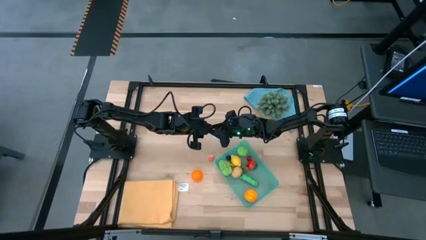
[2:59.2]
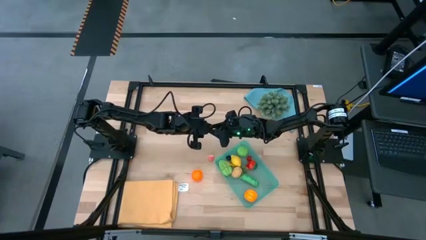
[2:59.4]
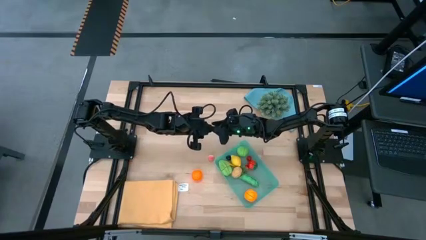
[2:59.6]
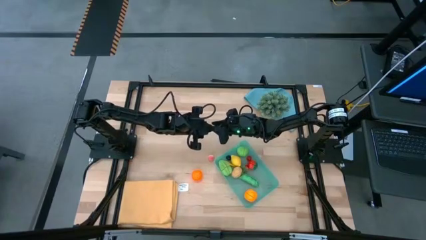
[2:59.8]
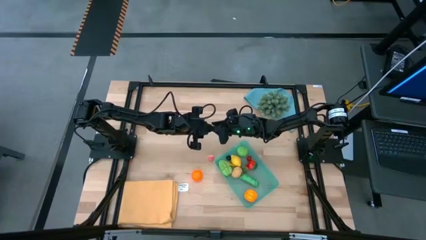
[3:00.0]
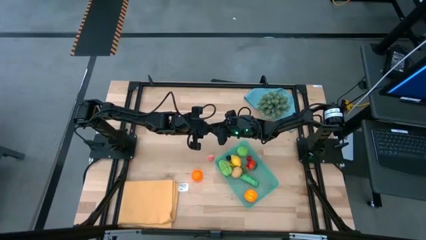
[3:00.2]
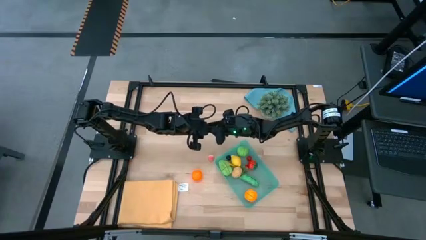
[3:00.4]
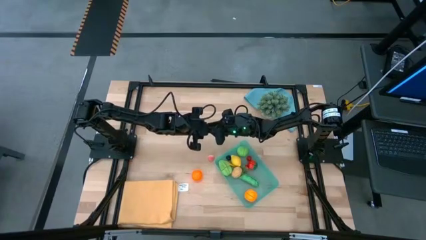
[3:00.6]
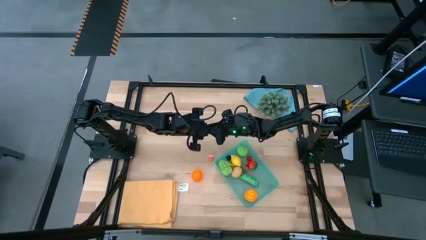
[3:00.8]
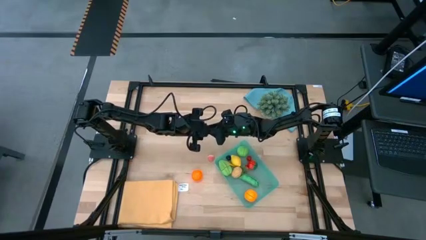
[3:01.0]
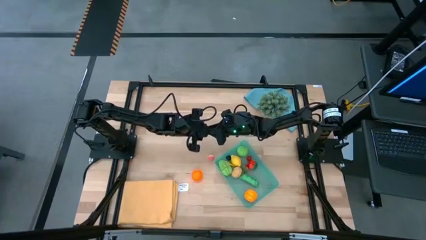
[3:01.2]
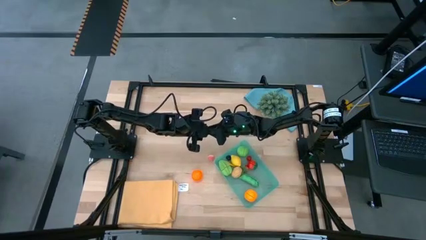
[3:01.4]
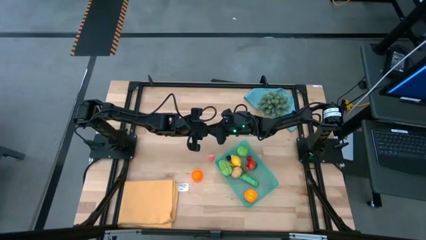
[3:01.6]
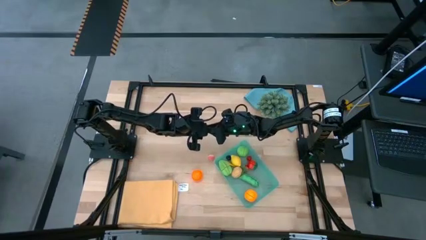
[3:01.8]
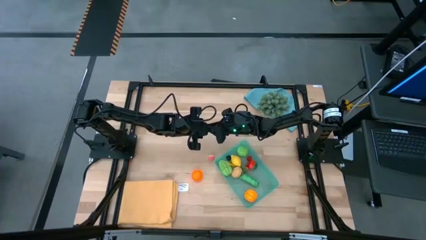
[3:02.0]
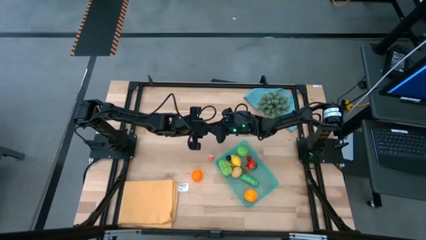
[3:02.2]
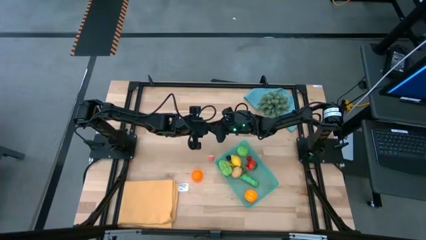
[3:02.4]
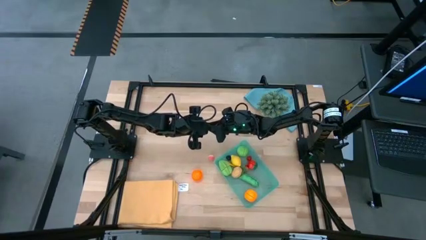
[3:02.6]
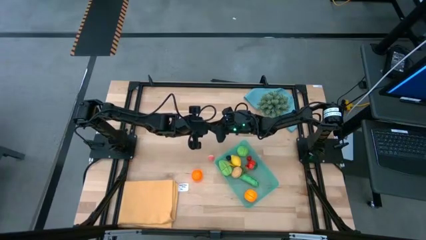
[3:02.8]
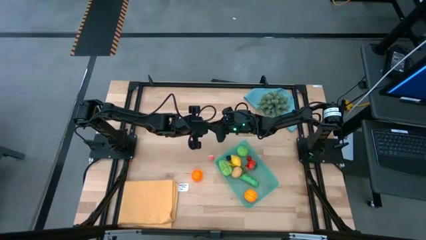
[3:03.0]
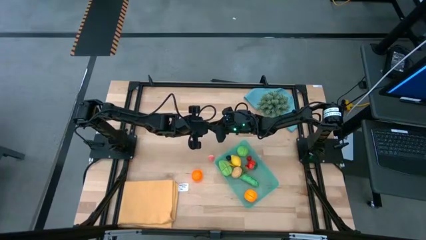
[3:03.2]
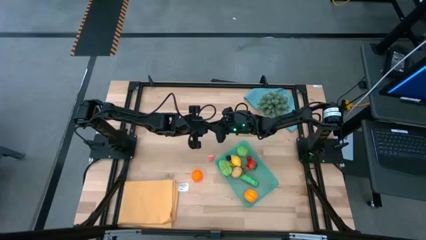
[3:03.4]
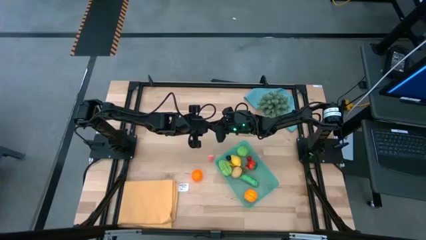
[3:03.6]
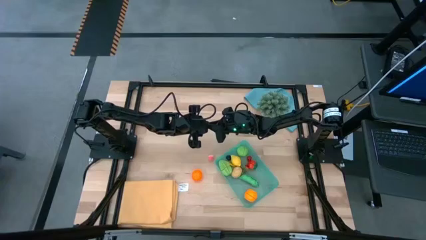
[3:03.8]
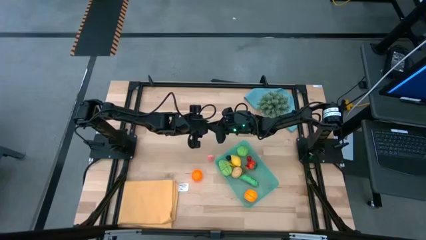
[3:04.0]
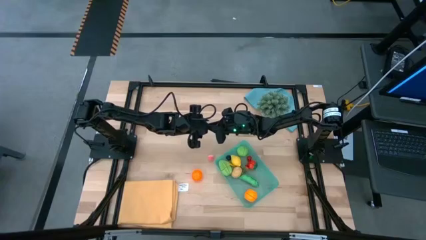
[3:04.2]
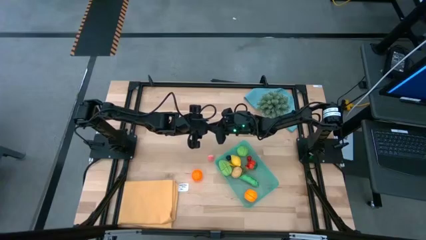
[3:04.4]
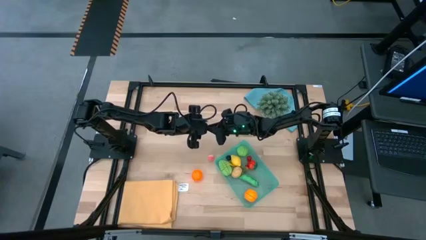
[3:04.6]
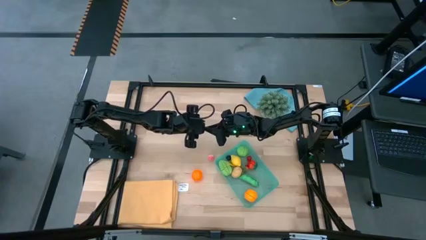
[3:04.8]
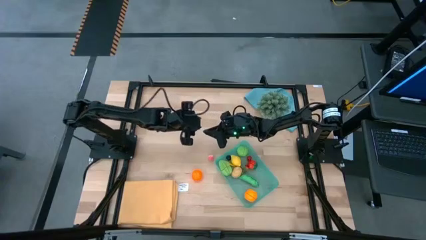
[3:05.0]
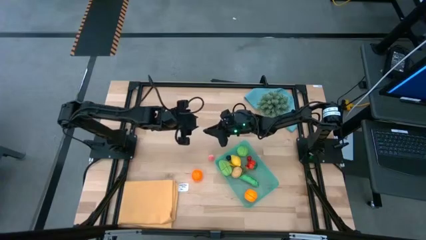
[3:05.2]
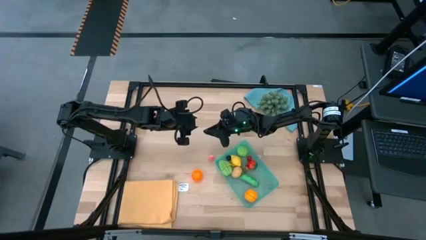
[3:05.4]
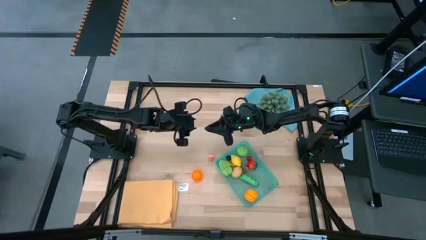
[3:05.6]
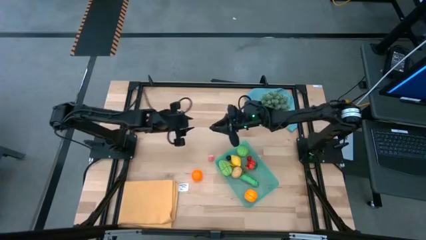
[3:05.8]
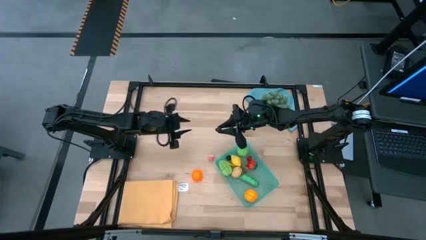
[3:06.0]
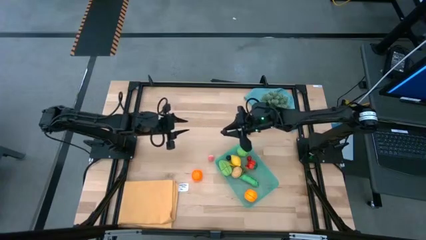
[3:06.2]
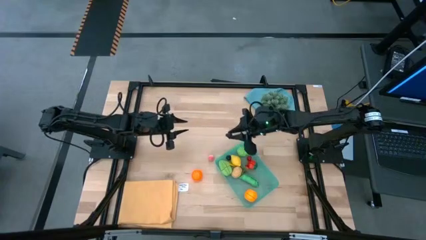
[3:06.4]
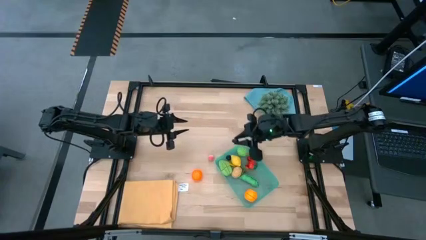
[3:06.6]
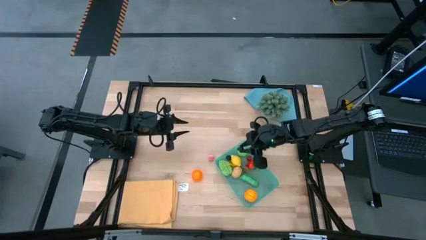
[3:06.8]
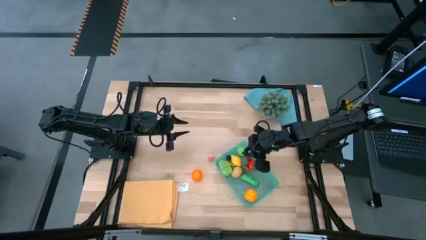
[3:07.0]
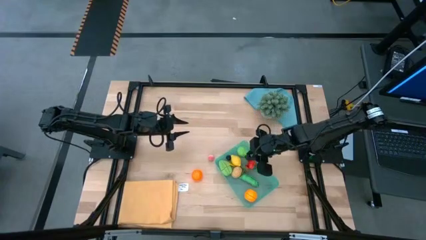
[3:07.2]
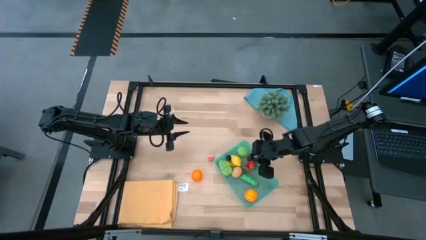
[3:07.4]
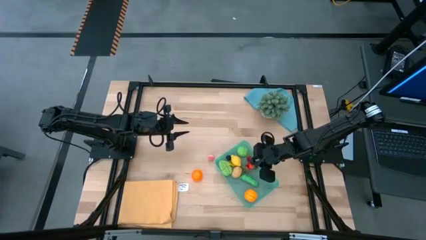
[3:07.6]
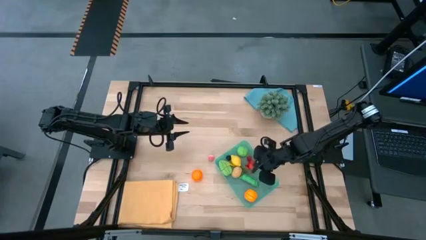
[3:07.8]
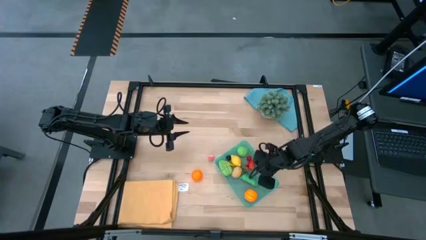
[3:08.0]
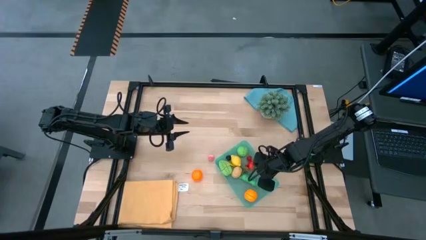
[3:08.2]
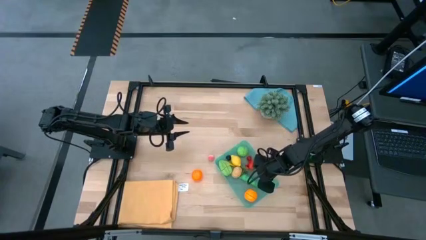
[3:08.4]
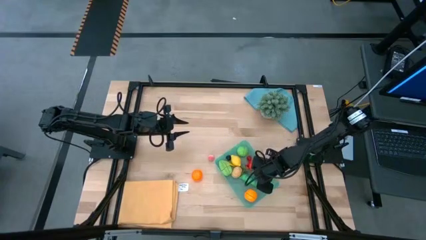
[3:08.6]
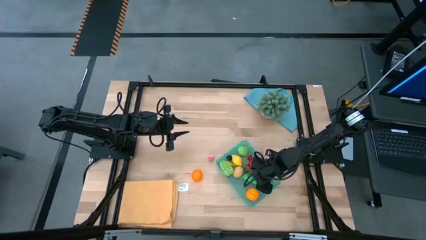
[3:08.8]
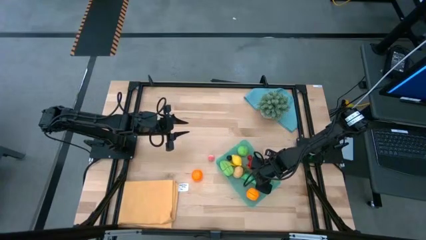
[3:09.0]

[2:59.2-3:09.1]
Task: Pick and placing Produce into tupperware
Put the blackberry into the green bin

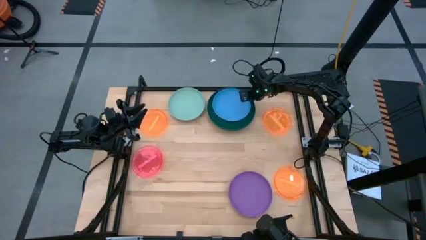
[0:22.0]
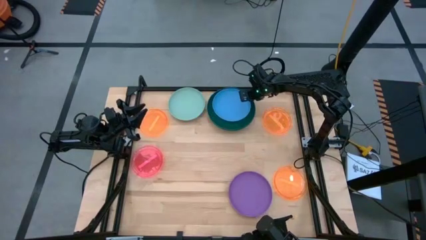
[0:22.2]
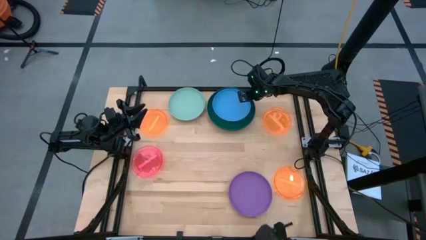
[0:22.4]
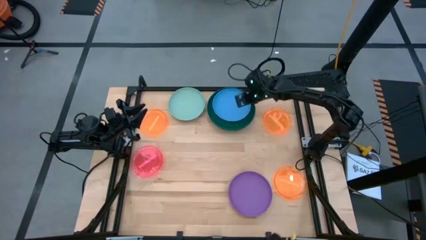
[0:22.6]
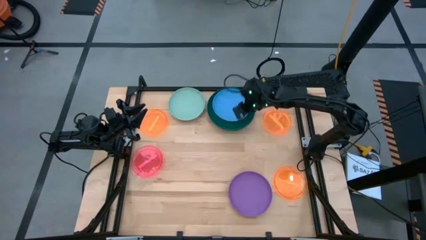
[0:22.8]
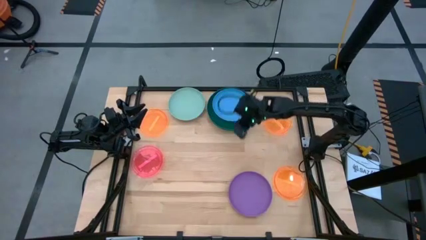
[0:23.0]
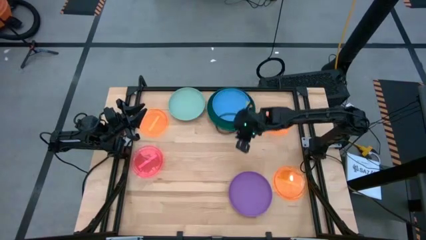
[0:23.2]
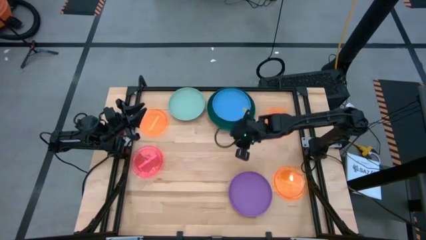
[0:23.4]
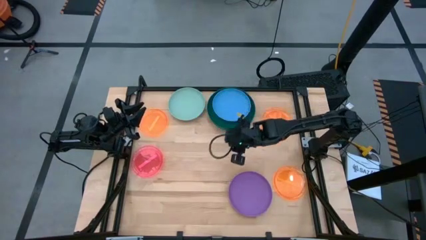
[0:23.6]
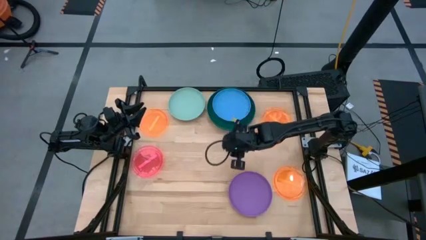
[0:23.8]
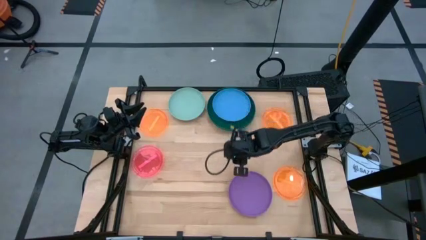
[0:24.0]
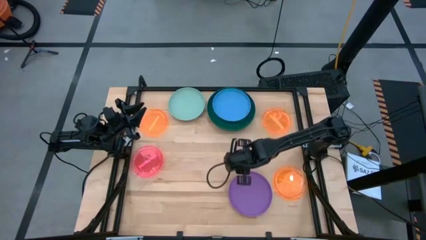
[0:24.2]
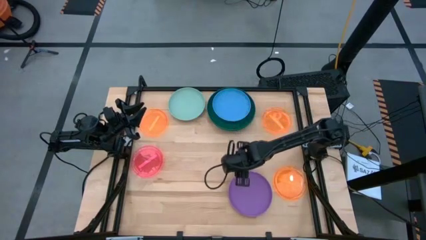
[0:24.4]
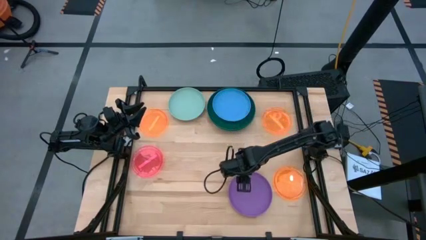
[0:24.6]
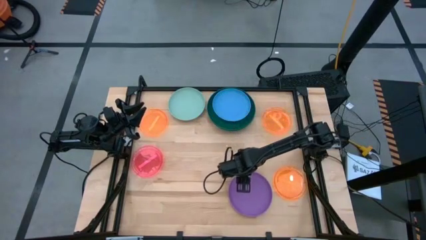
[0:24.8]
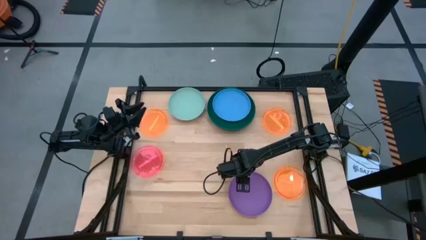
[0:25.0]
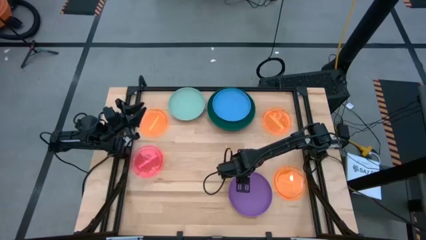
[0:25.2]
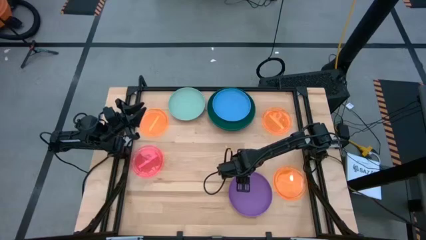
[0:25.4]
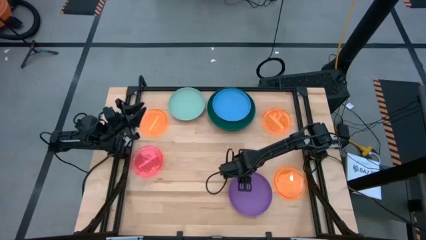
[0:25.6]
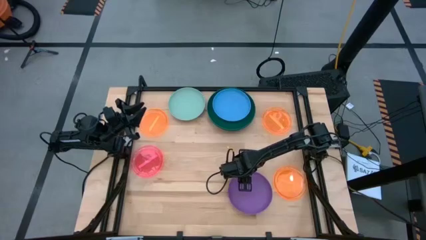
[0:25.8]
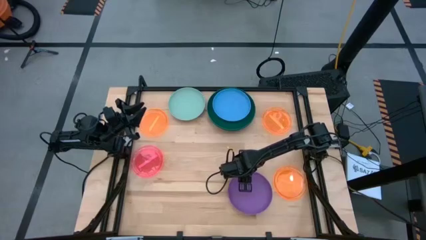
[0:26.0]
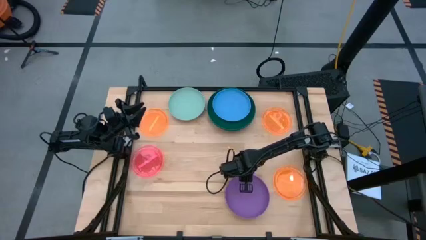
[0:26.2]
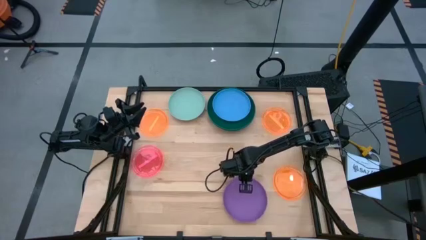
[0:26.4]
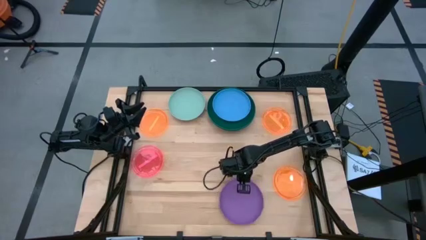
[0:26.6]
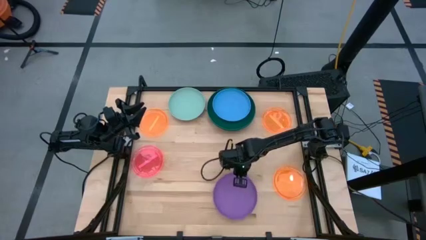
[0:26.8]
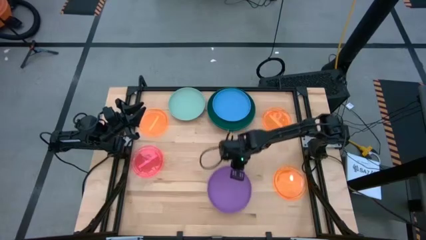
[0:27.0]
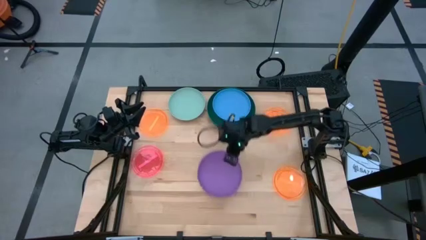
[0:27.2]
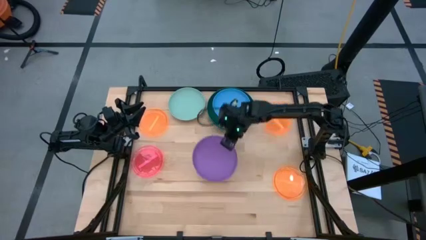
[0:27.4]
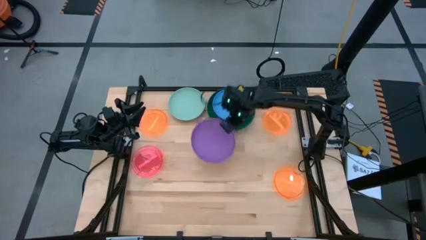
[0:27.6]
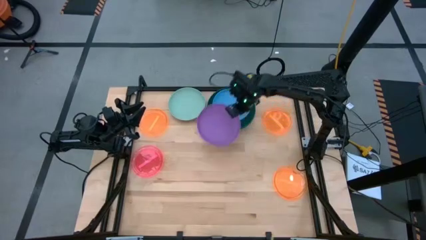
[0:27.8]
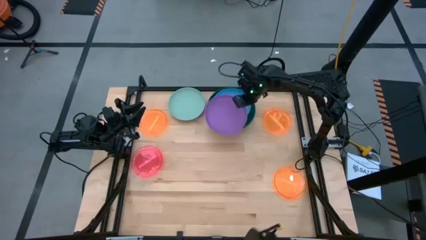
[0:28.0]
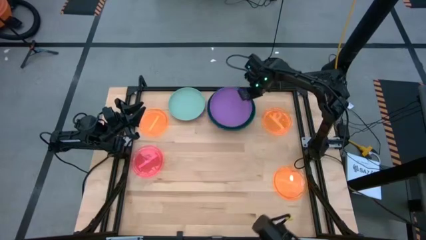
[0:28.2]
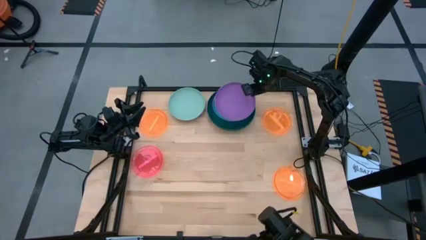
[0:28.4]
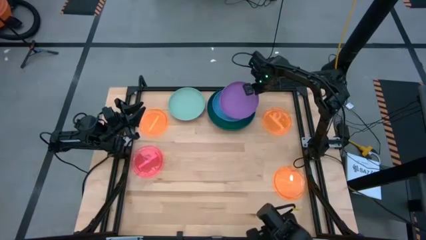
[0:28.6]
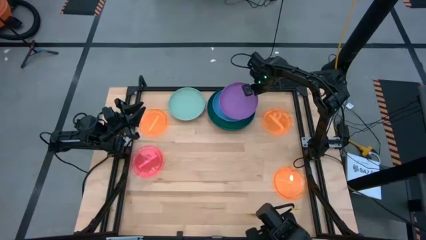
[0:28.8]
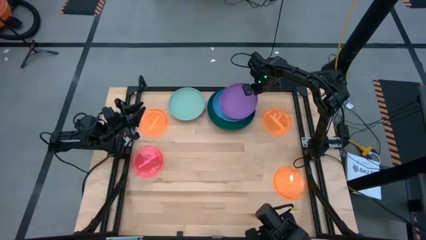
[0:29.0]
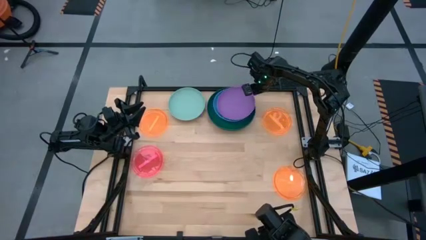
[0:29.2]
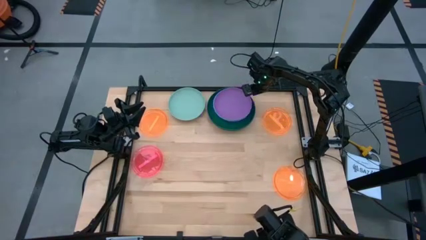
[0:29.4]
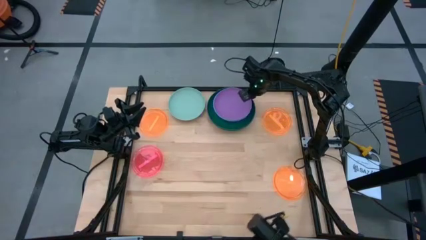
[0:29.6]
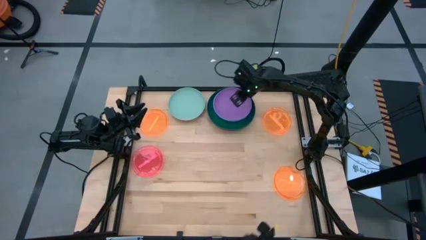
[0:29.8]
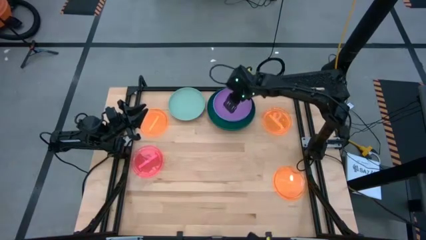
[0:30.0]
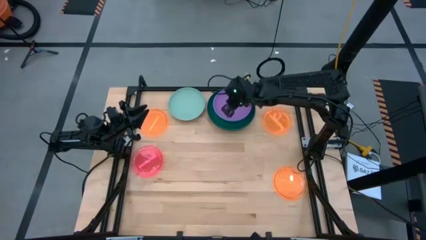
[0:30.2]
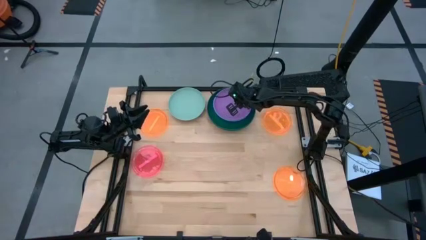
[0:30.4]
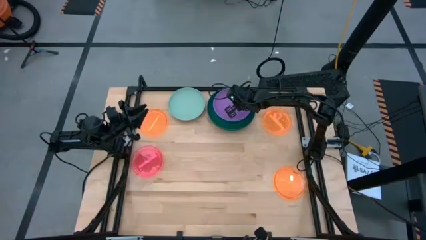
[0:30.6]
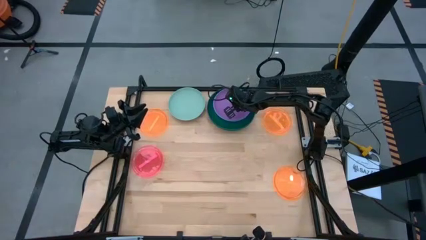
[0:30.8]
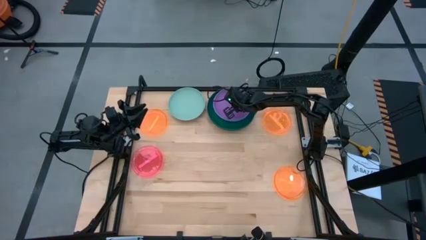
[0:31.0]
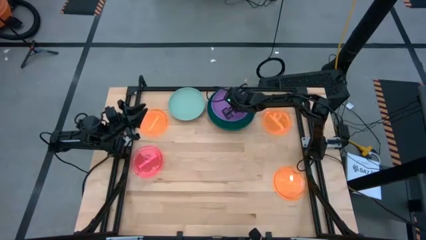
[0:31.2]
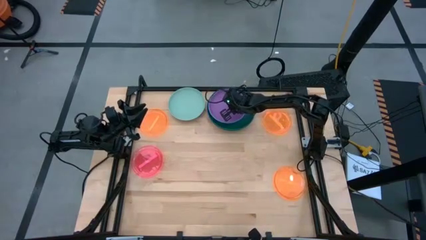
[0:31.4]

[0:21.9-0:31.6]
Task: Stack plastic plates
Stack the violet plate on the blue plate
